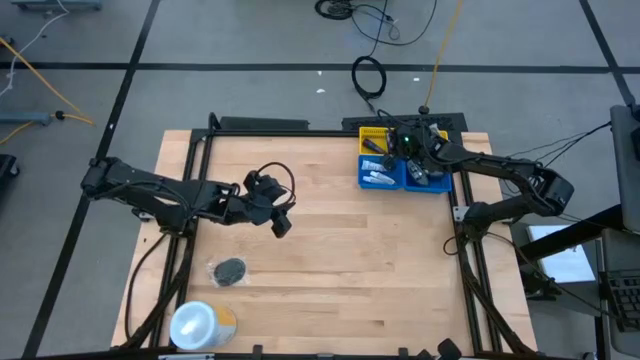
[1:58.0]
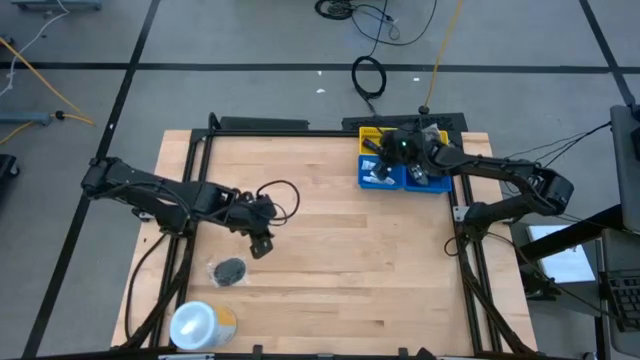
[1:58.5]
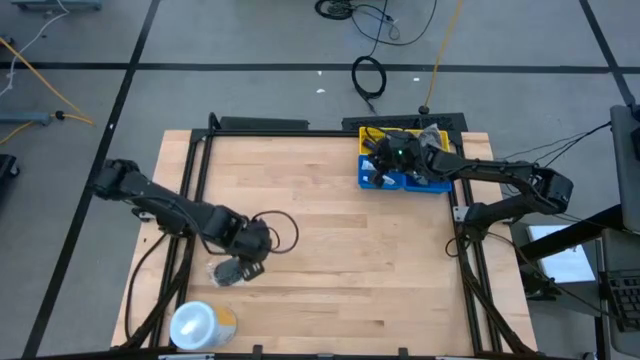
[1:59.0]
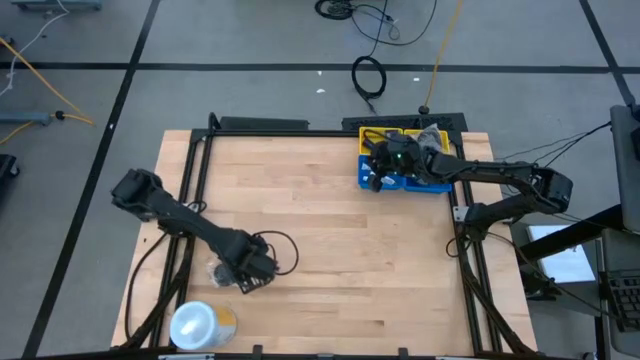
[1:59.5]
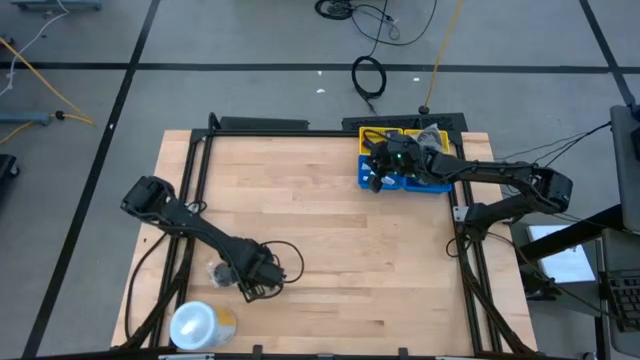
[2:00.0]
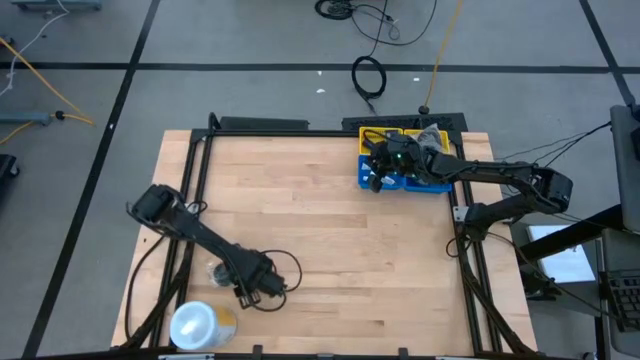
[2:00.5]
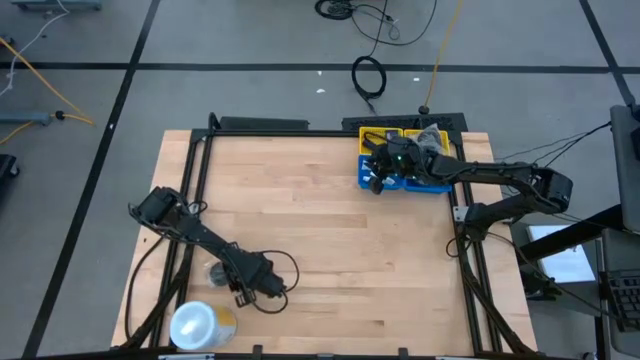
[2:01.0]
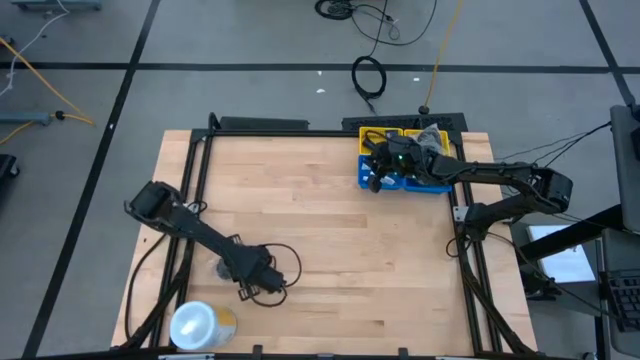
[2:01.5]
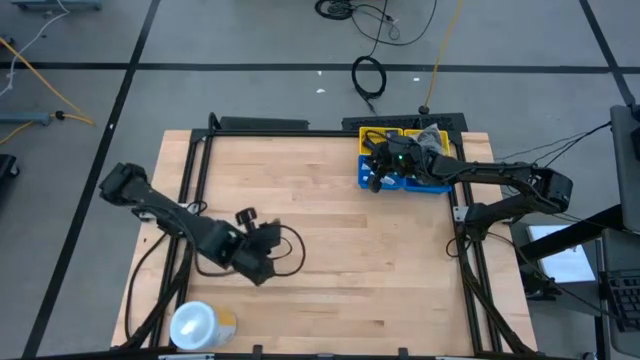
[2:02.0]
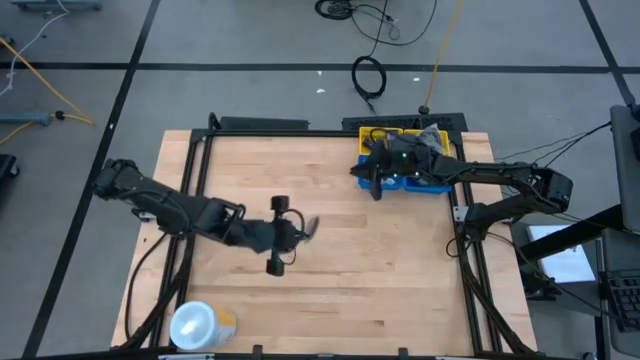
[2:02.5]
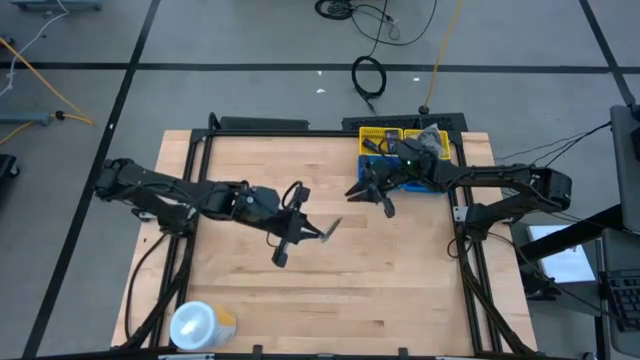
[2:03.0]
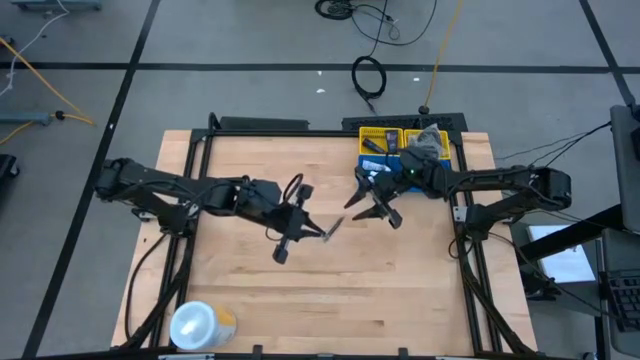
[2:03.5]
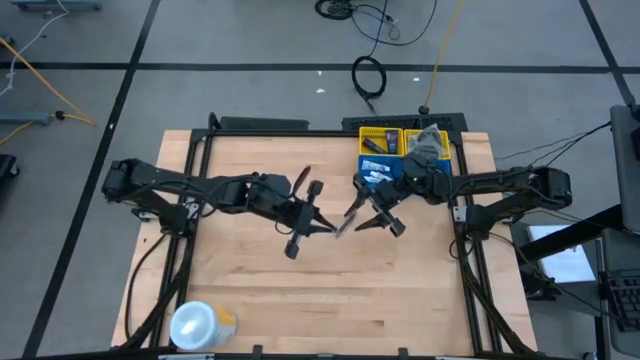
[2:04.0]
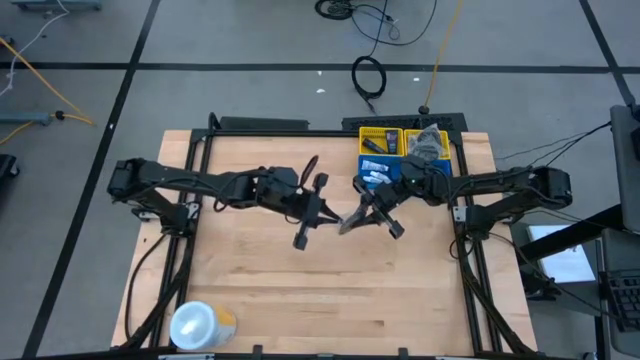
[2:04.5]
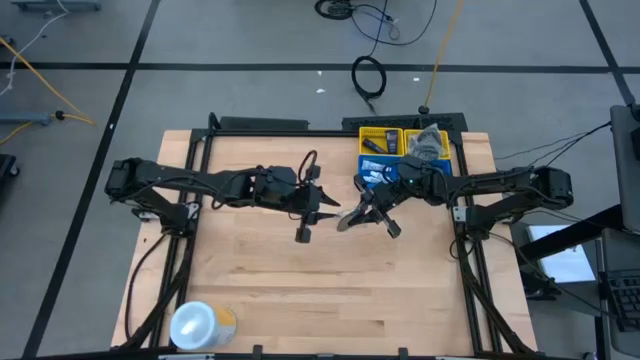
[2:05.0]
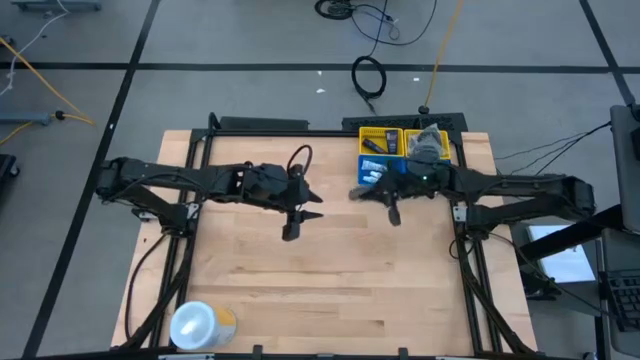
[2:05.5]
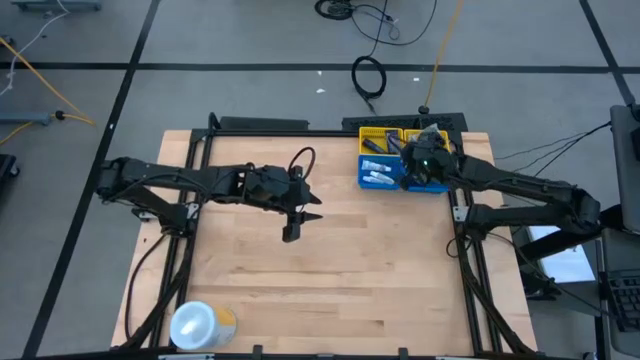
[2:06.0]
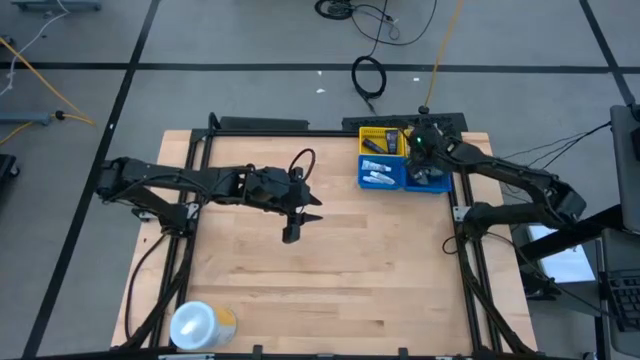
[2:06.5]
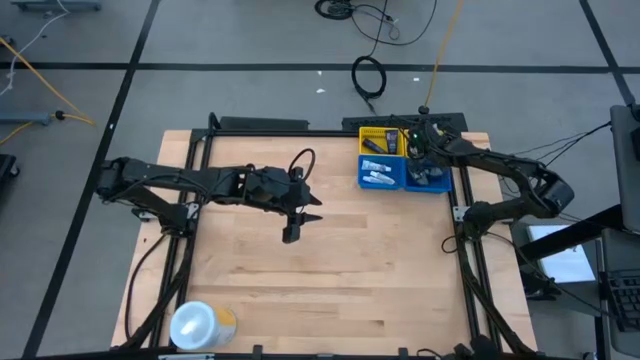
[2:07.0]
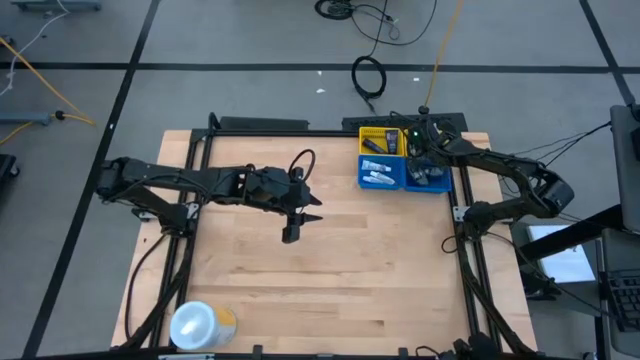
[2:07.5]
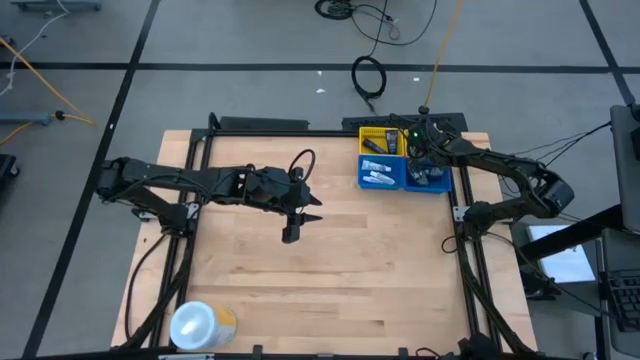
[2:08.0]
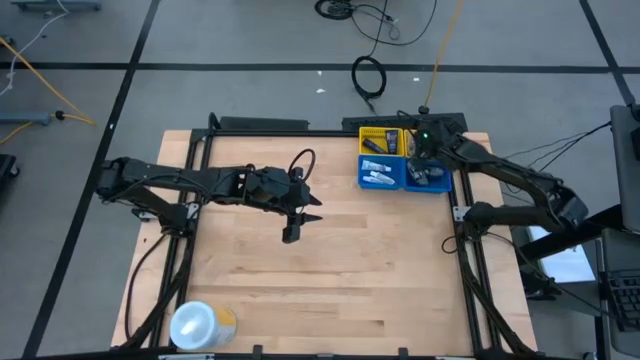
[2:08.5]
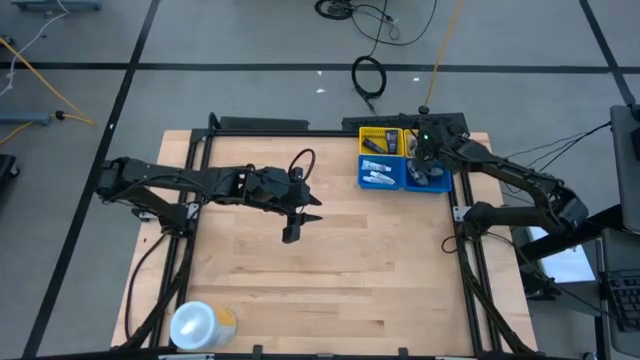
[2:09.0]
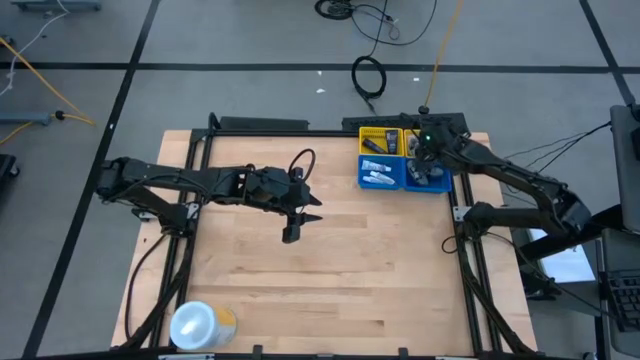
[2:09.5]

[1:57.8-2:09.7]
Task: Pick & Place Travel size toiletries
Put the black hairbrush into the right yellow basket

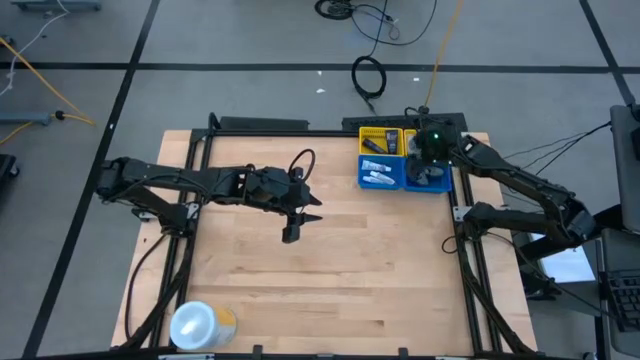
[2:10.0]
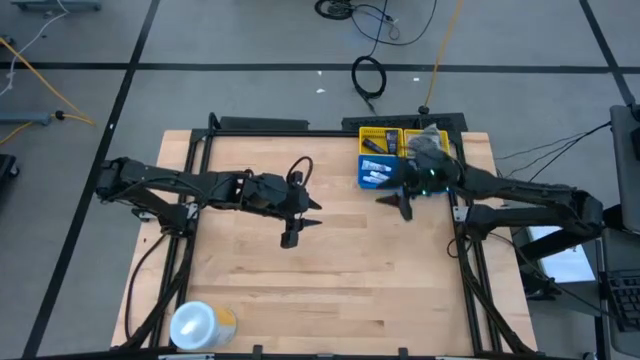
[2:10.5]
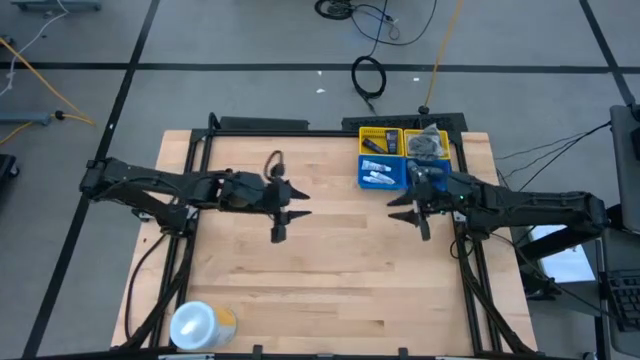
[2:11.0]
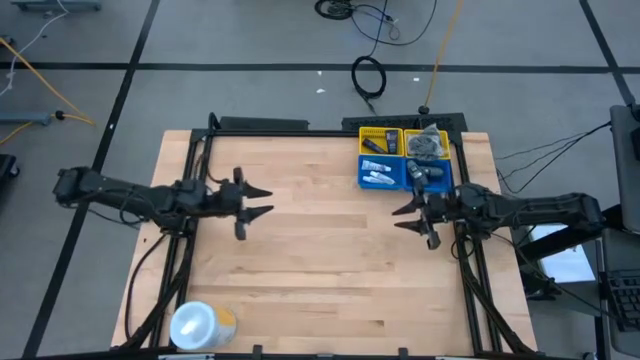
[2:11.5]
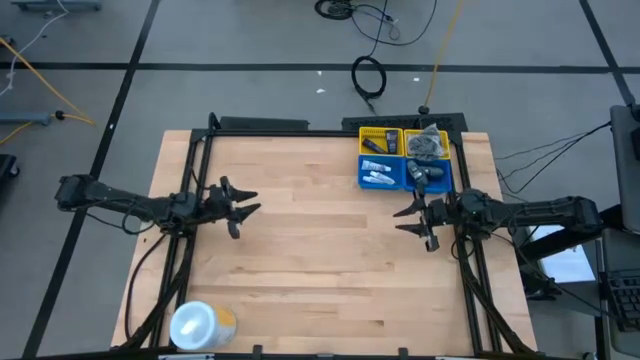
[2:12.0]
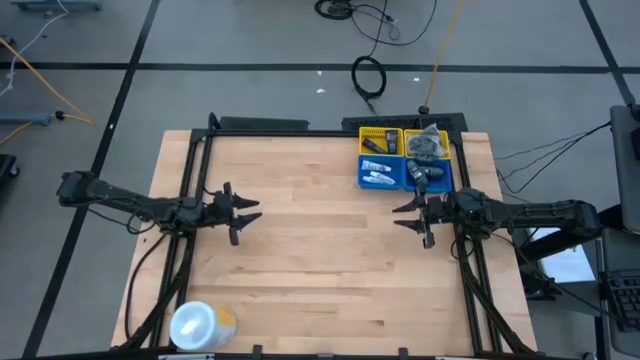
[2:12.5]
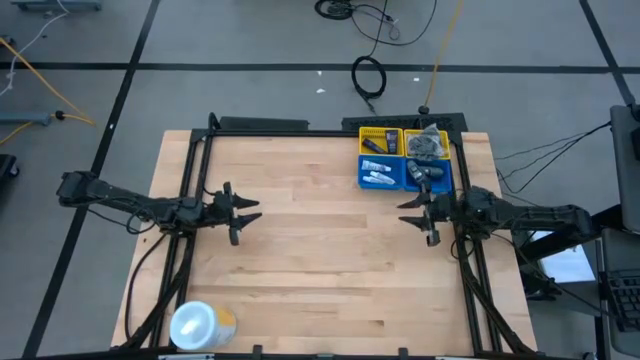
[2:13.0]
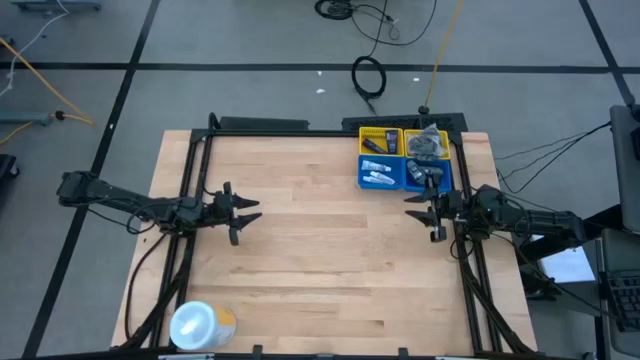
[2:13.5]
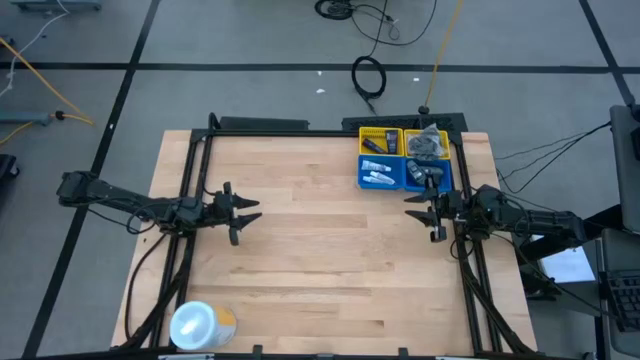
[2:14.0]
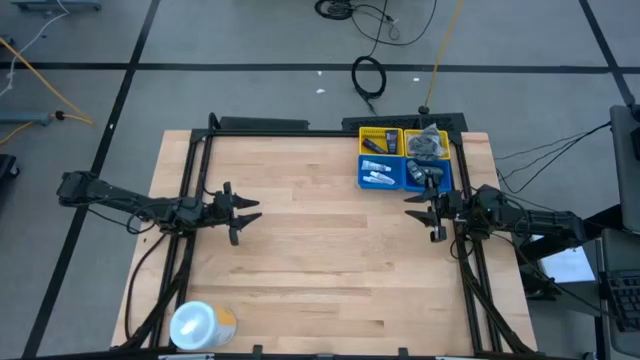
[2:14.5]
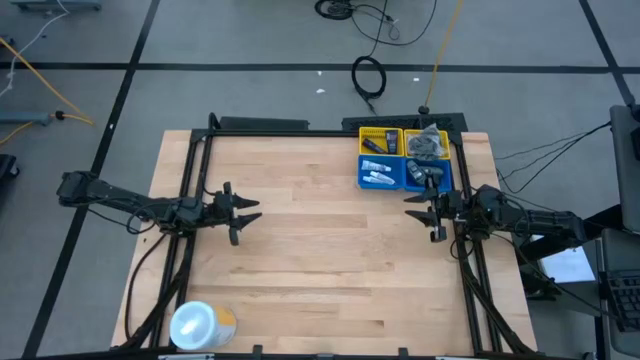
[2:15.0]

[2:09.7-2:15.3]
Return to Home Position

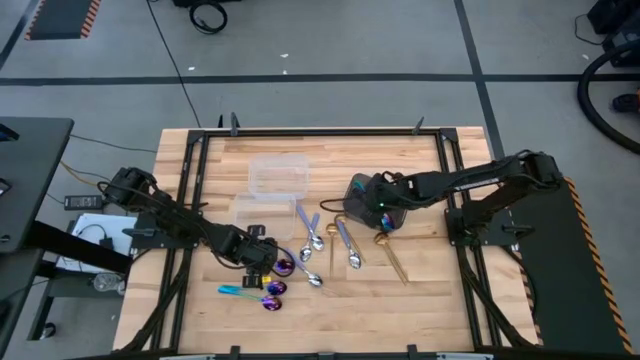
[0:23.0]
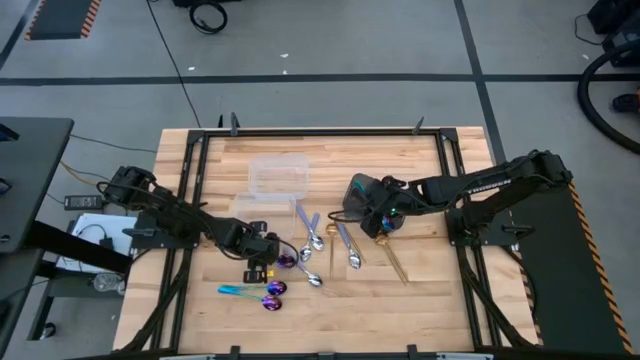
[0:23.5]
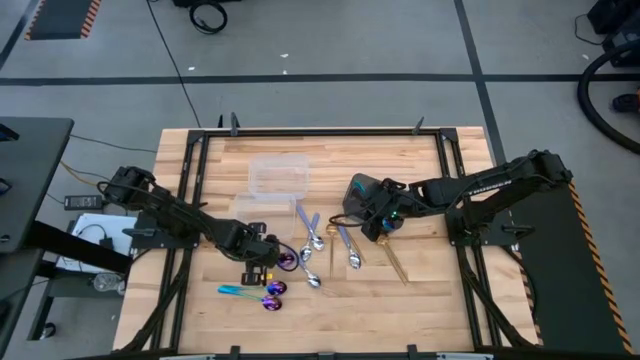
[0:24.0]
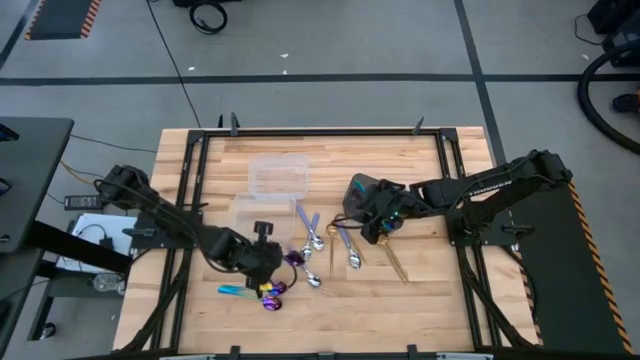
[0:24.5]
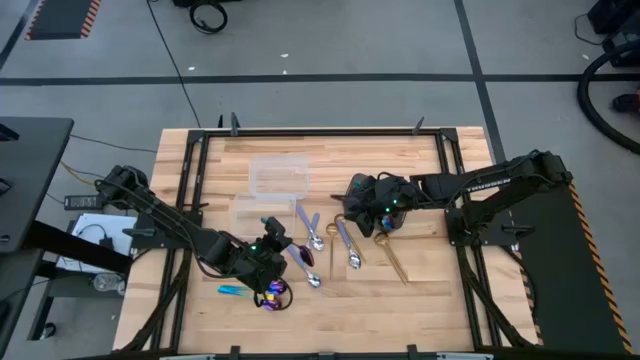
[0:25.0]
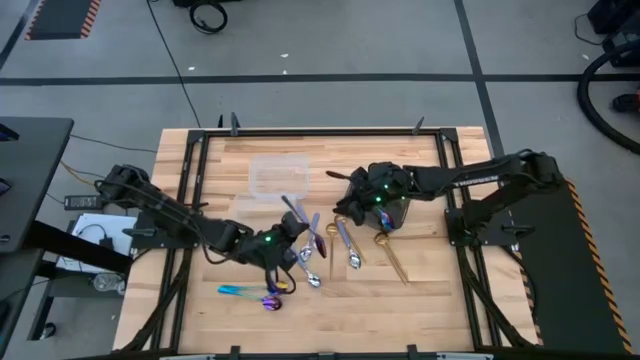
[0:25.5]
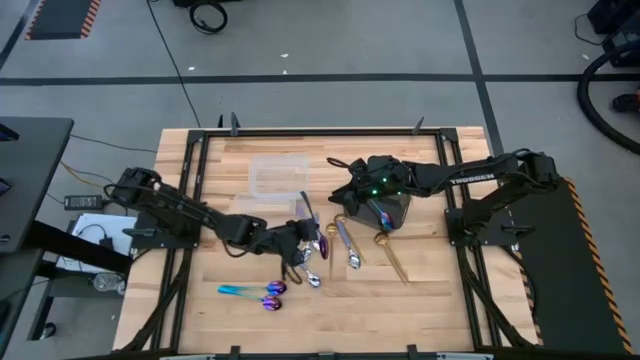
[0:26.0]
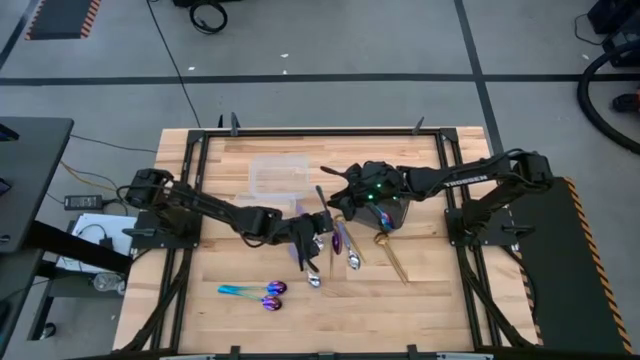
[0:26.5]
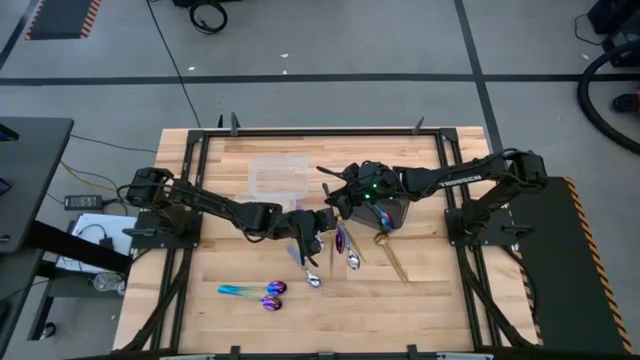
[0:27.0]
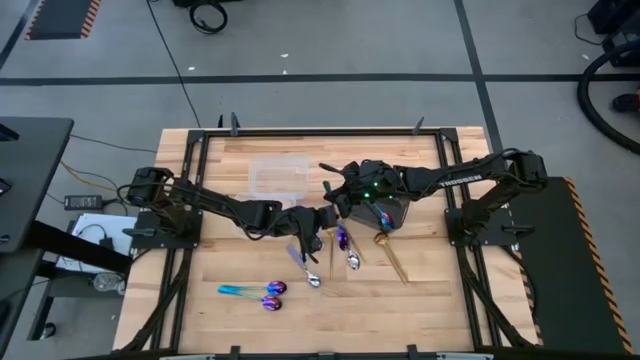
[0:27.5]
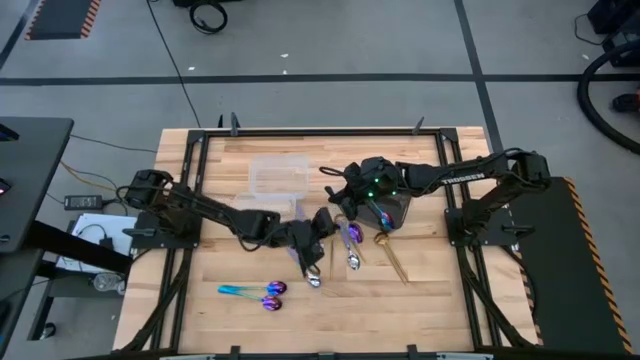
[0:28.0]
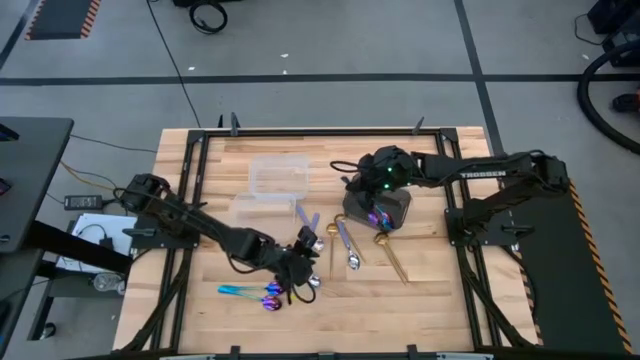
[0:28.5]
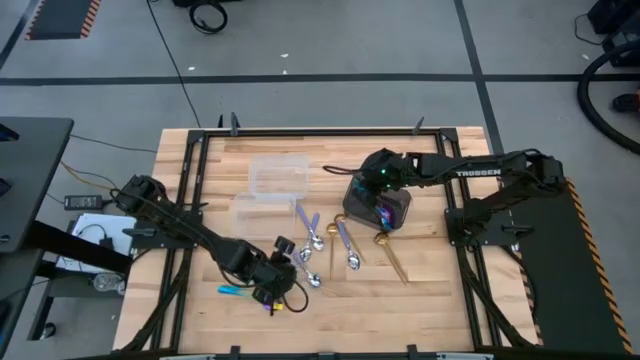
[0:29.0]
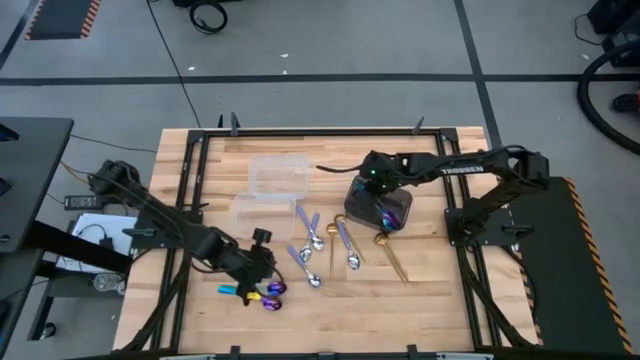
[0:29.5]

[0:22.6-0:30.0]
Task: Sort silverware by color (type)
Put the purple spoon into the black bin
